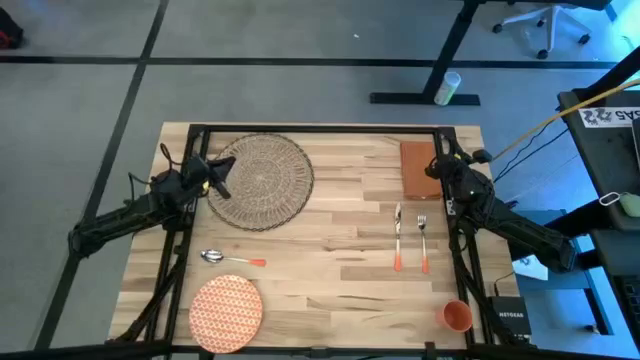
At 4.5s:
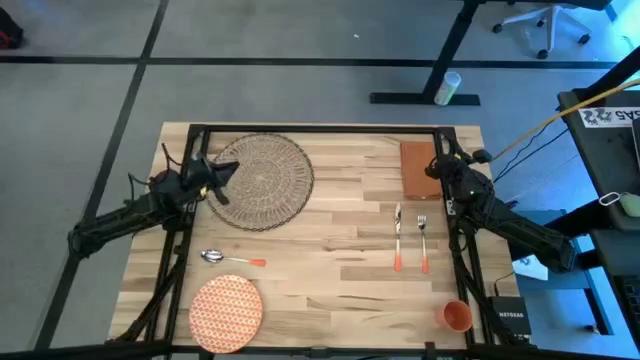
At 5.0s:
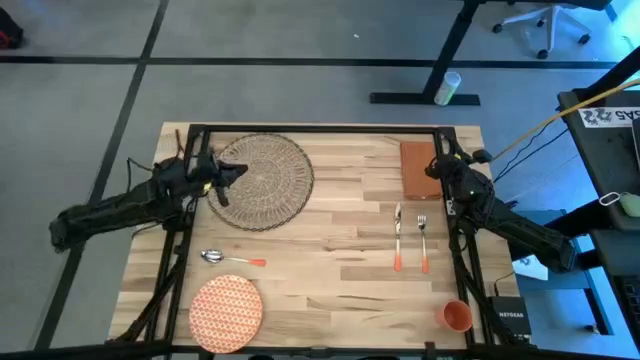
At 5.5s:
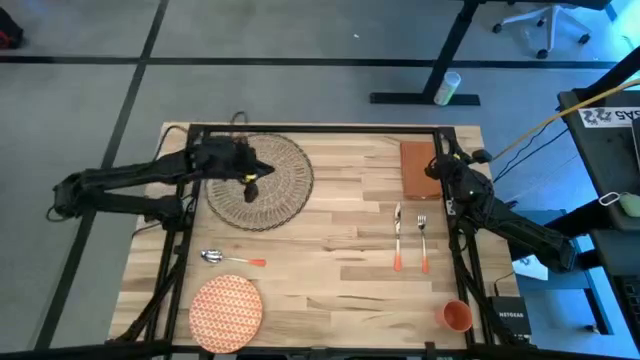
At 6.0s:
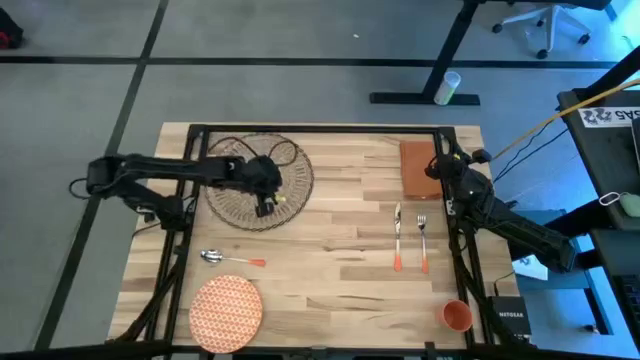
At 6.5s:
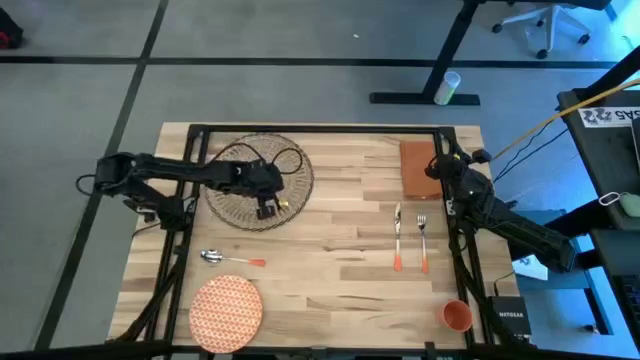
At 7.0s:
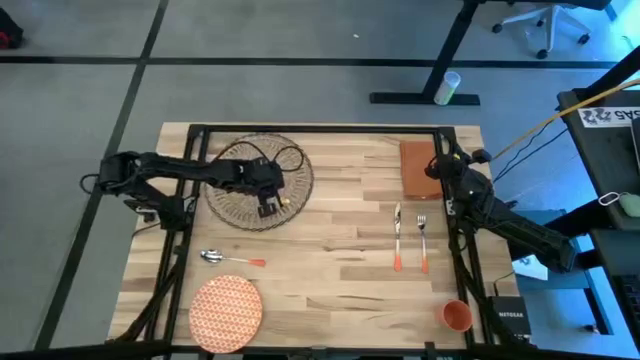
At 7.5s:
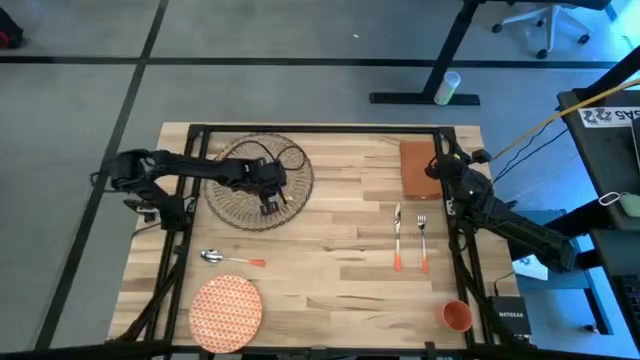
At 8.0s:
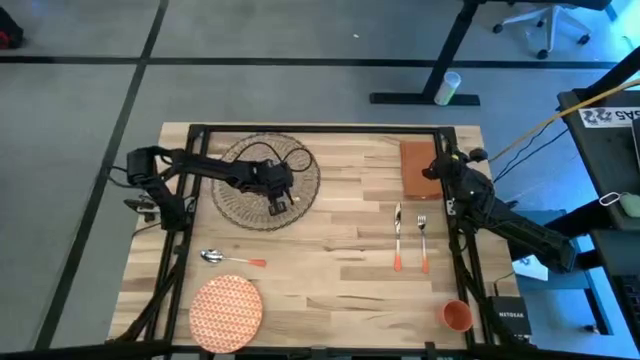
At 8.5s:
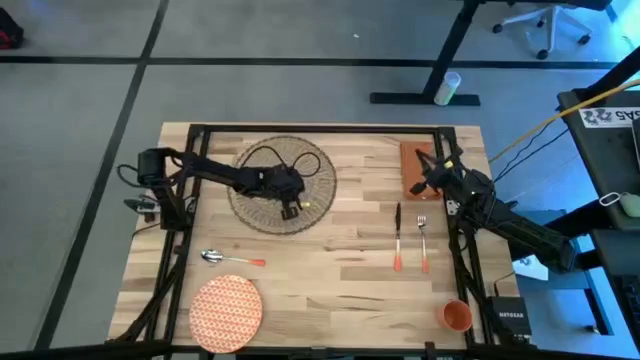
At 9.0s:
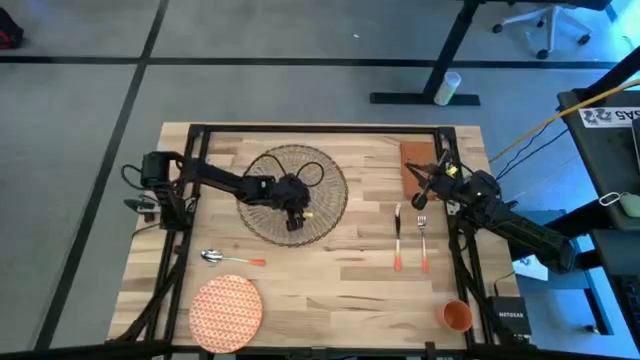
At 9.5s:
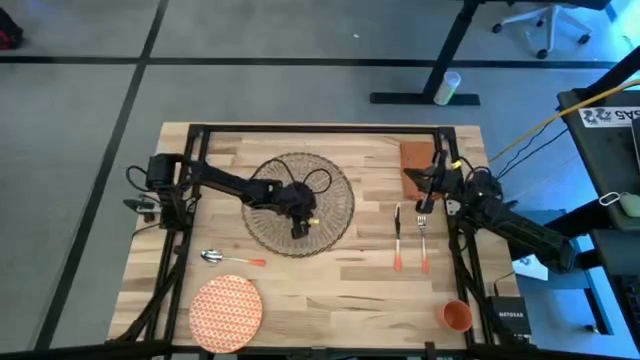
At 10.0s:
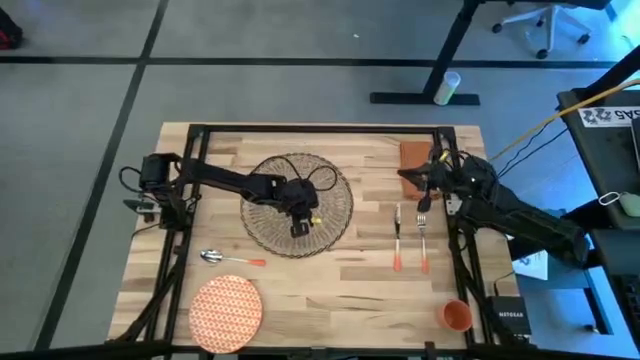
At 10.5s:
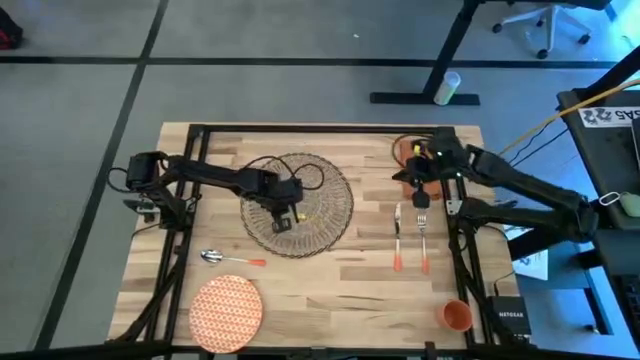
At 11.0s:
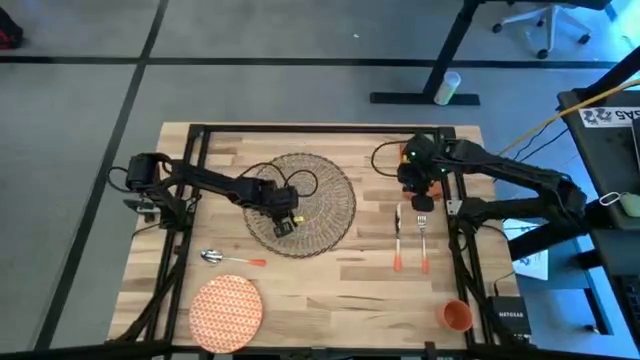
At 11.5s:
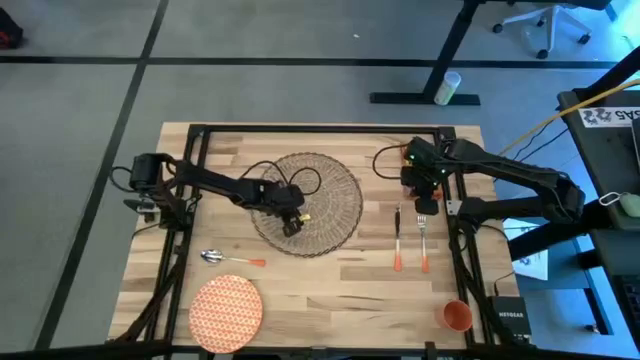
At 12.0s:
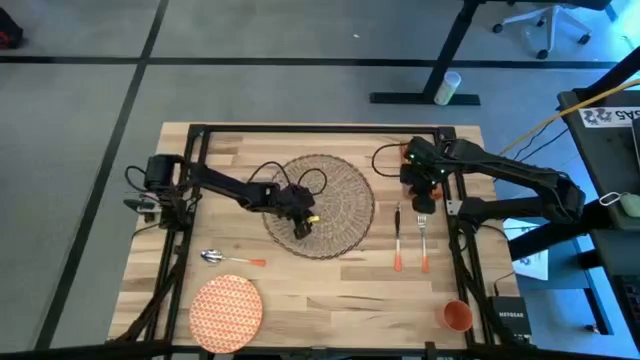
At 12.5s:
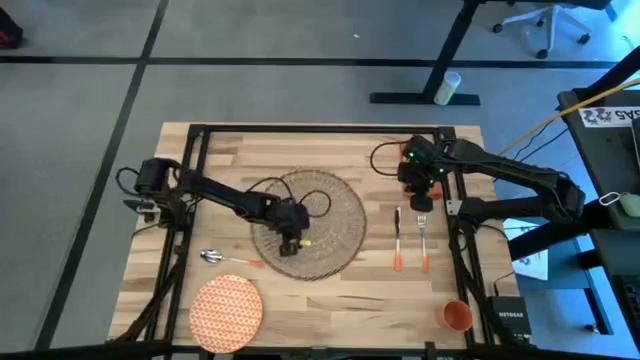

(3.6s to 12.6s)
Task: Set table place
Move the brown woven placemat to the center of the table

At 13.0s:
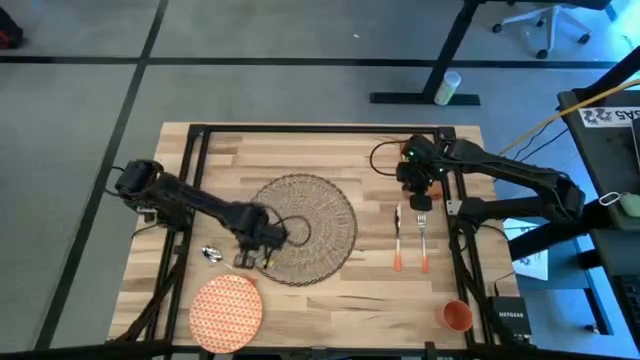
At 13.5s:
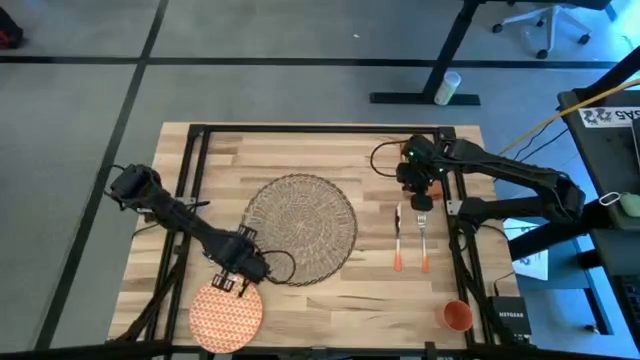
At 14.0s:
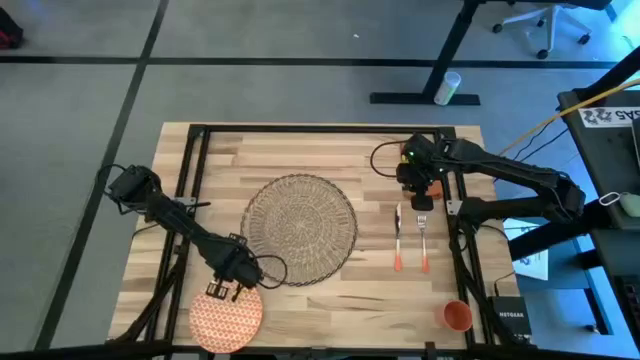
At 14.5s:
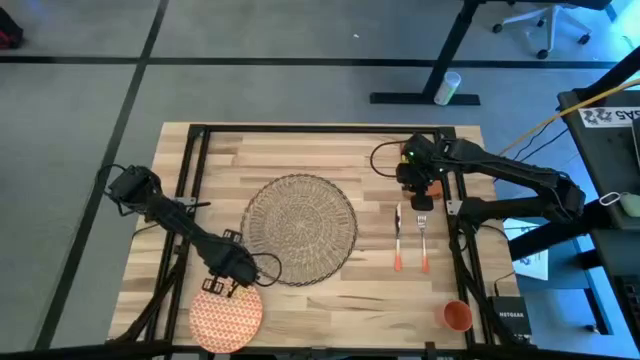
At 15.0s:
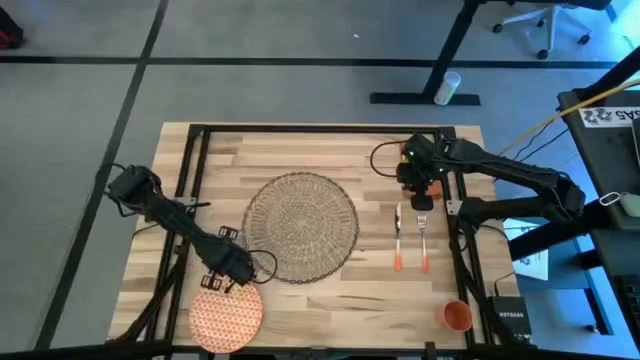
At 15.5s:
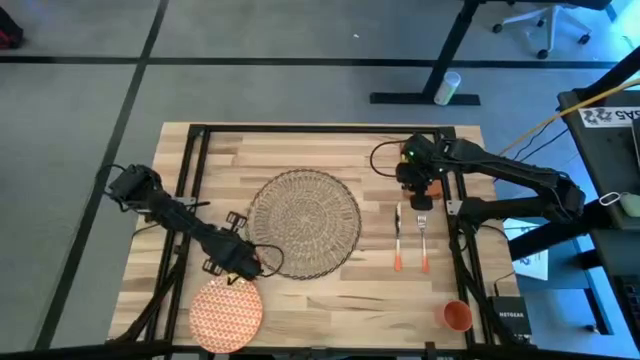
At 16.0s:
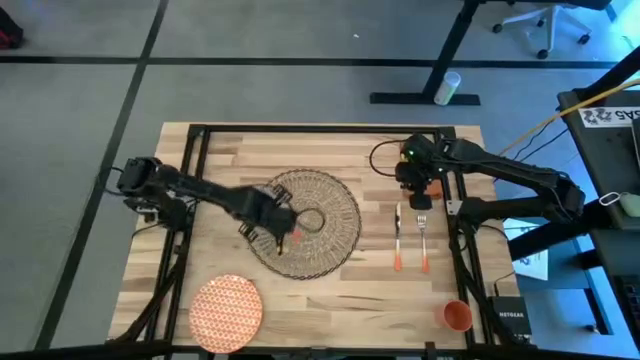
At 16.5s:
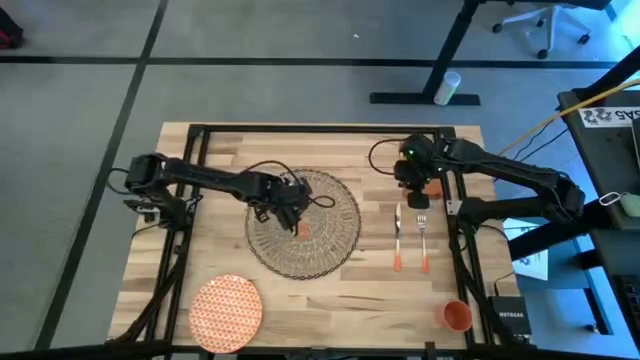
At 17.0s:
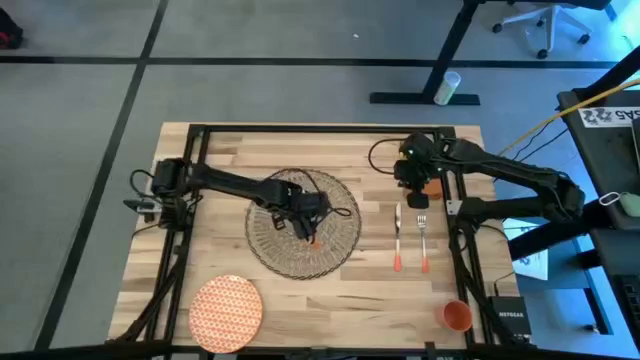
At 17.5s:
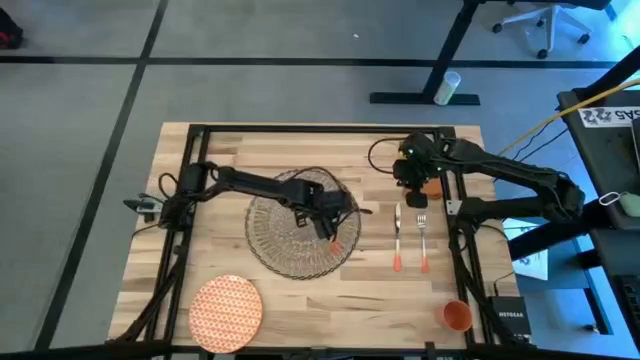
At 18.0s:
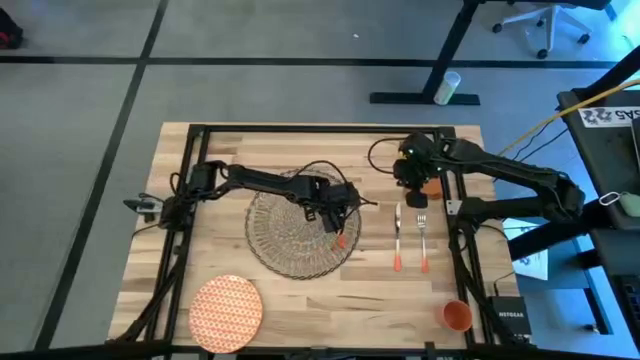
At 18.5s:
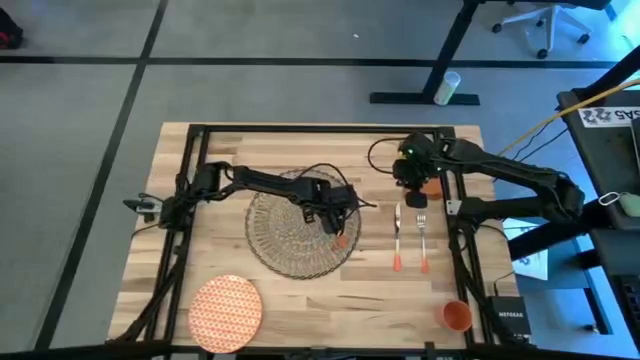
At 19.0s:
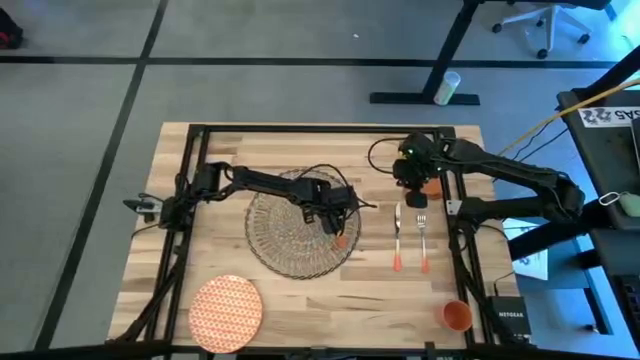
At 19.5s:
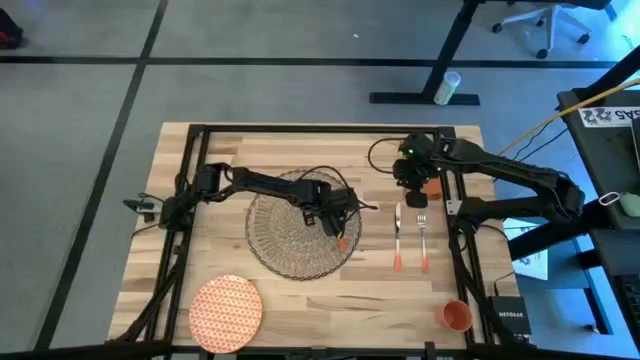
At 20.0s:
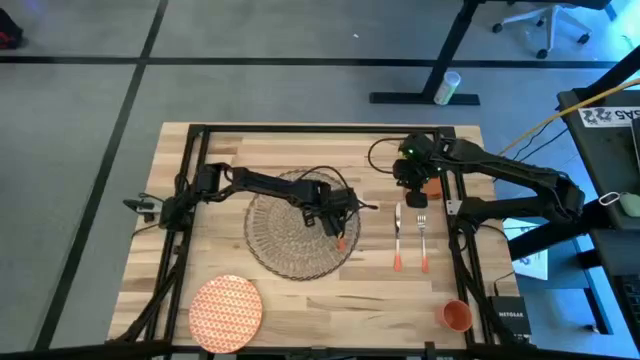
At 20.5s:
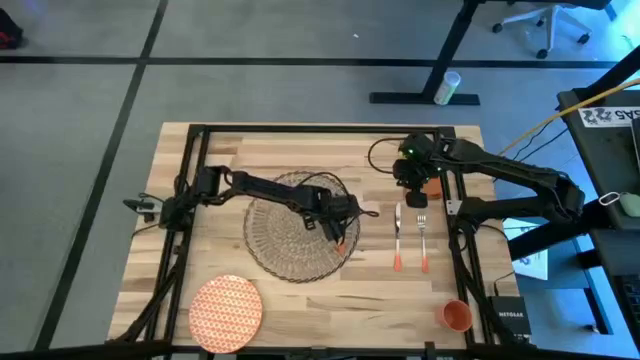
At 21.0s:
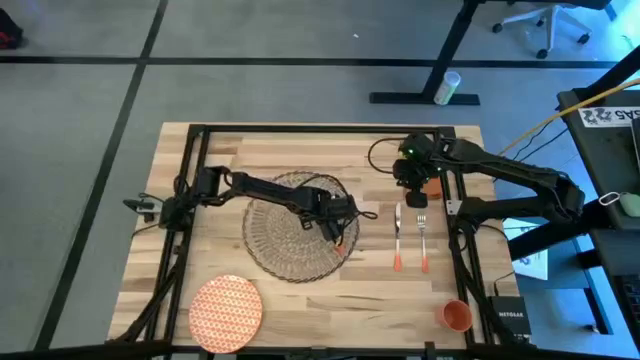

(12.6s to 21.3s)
Put the spoon on the brown woven placemat

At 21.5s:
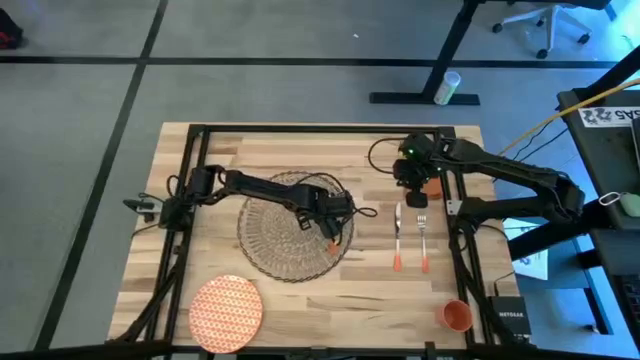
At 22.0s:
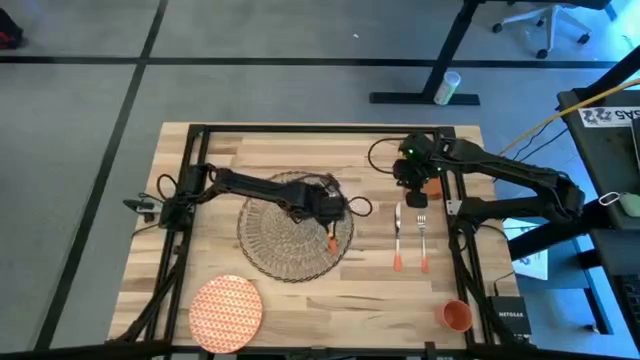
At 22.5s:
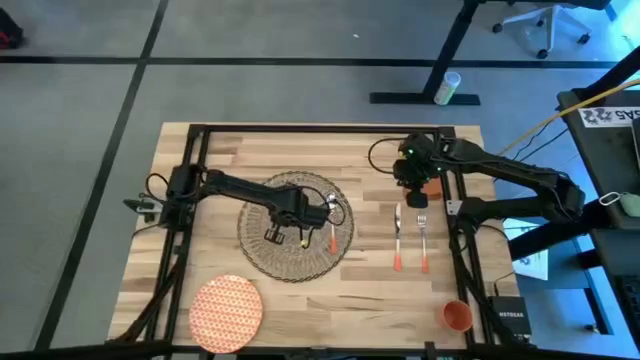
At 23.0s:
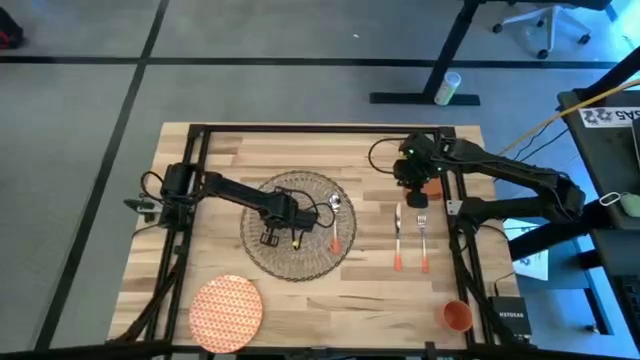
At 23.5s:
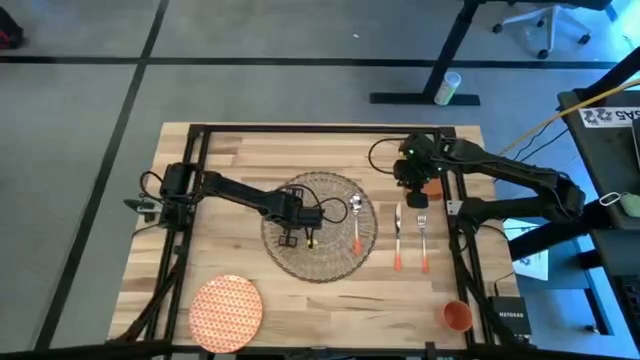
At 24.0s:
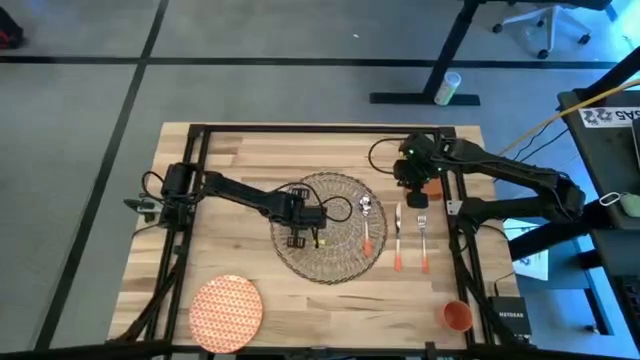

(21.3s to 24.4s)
Adjust the brown woven placemat to the center of the table

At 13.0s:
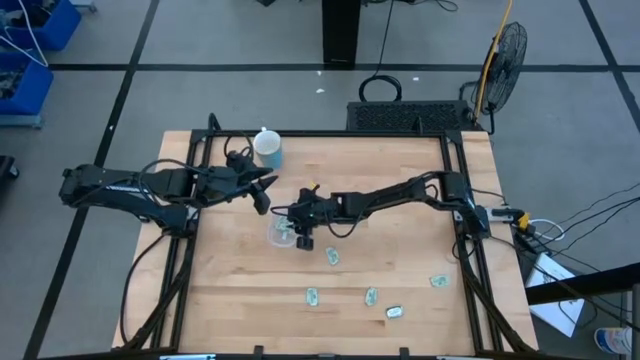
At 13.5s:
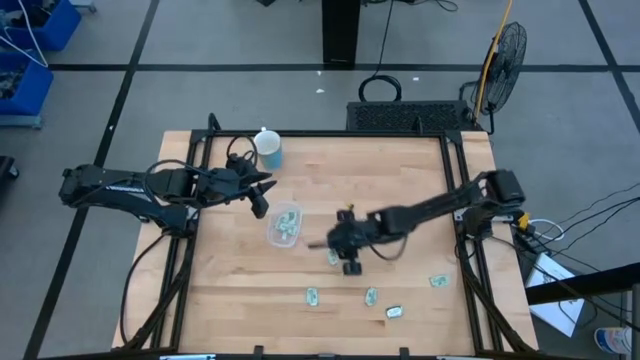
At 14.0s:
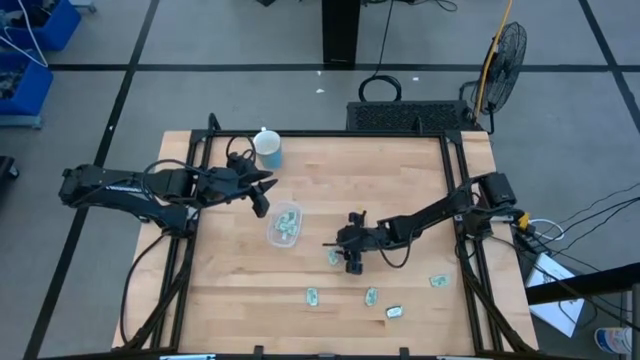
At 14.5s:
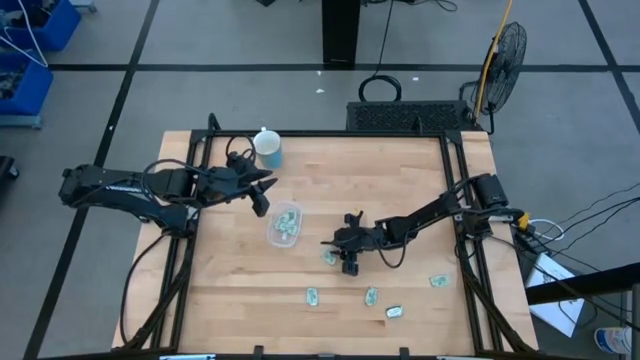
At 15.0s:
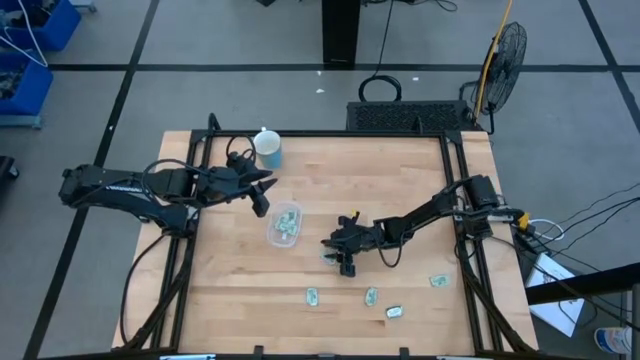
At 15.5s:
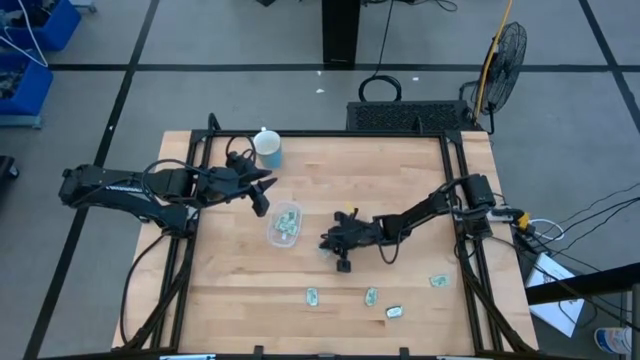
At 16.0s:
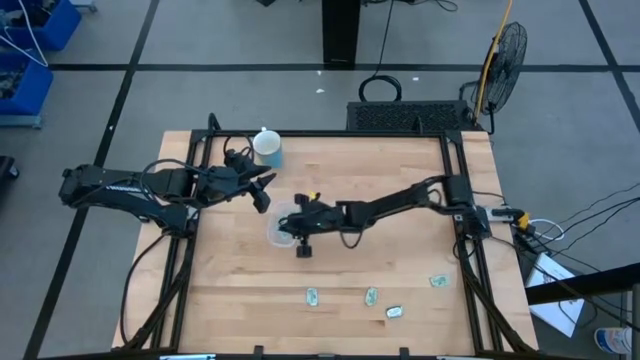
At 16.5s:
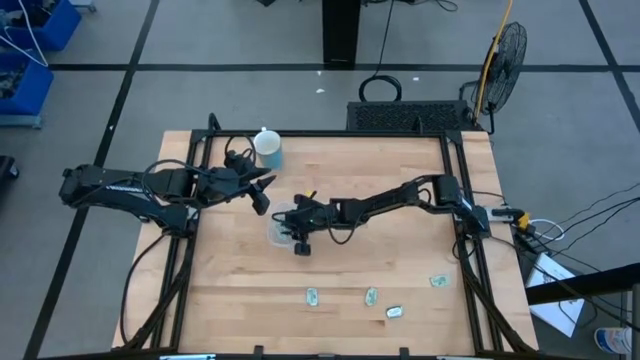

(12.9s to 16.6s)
Task: Pick and place Stevia / Truvia into bins
Put the light green stevia packet into the transparent container
